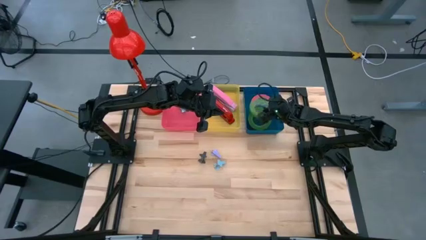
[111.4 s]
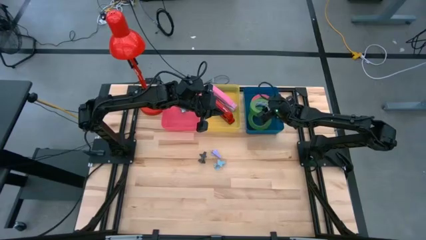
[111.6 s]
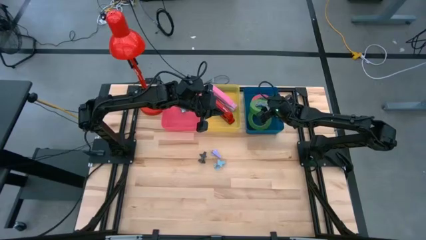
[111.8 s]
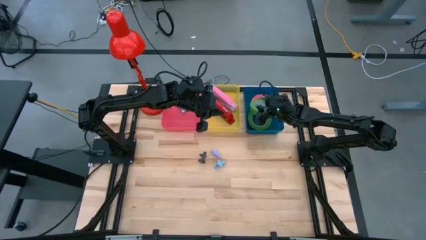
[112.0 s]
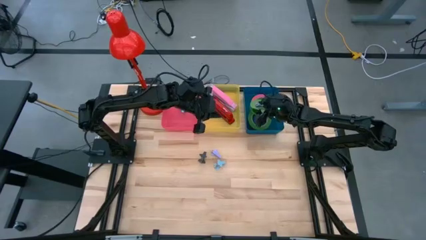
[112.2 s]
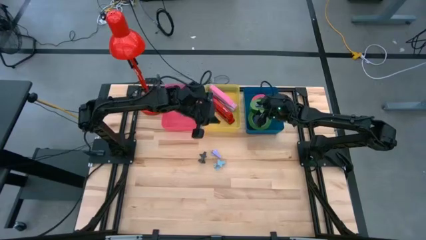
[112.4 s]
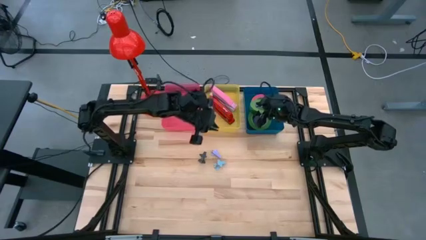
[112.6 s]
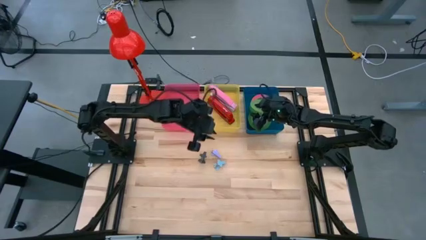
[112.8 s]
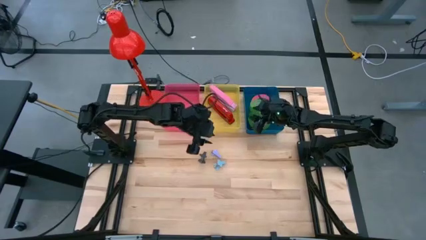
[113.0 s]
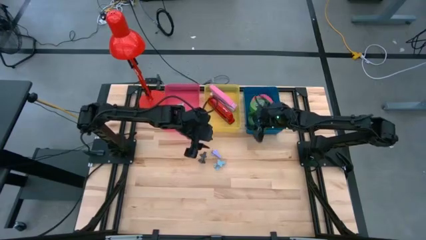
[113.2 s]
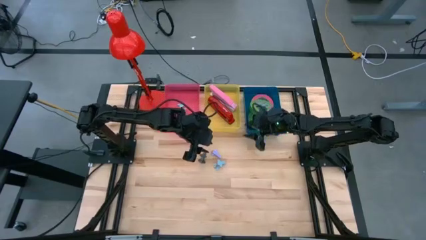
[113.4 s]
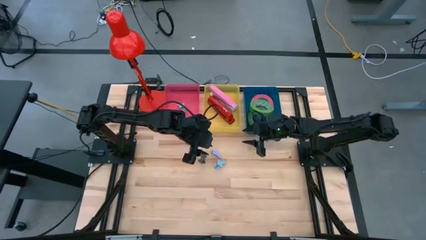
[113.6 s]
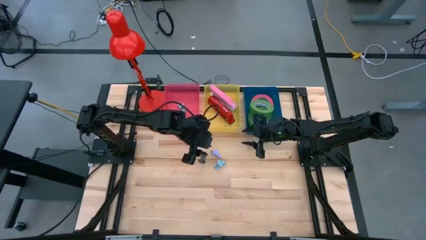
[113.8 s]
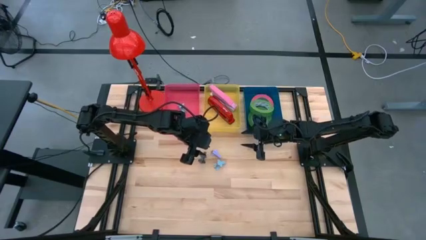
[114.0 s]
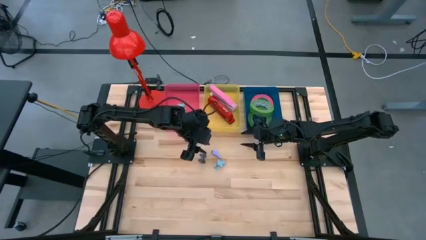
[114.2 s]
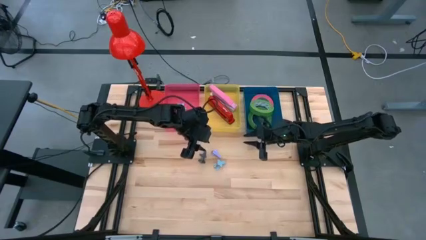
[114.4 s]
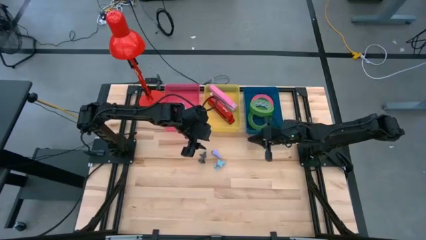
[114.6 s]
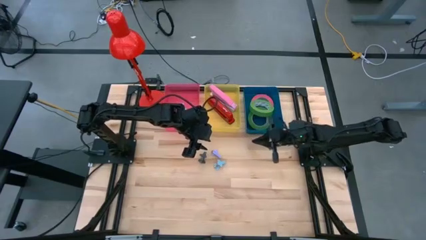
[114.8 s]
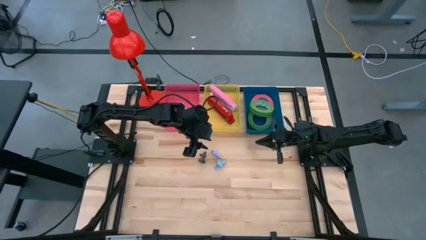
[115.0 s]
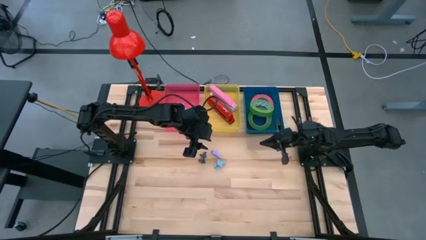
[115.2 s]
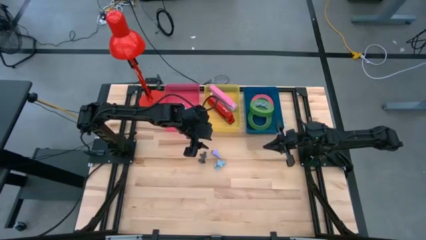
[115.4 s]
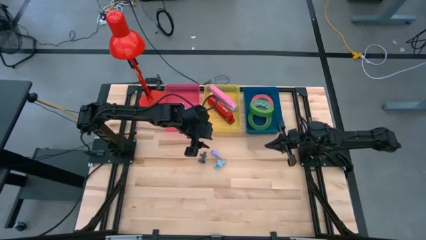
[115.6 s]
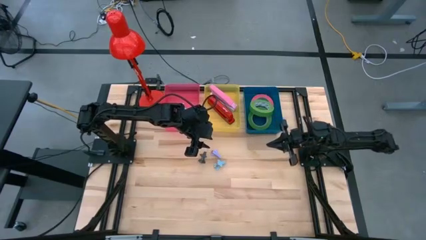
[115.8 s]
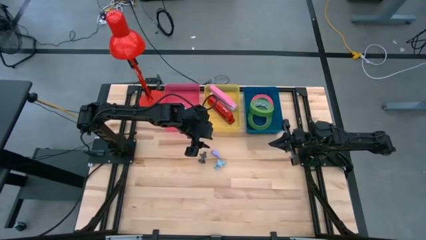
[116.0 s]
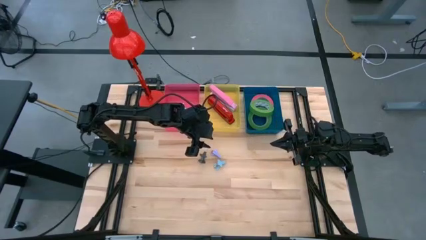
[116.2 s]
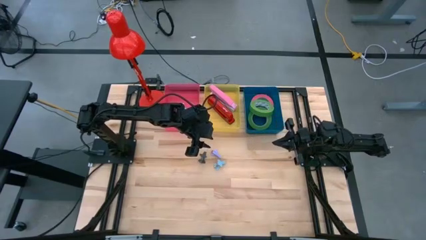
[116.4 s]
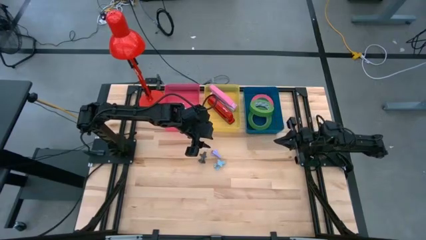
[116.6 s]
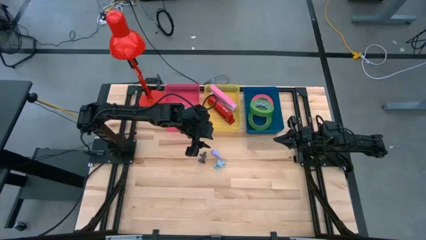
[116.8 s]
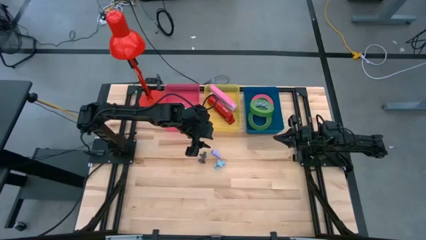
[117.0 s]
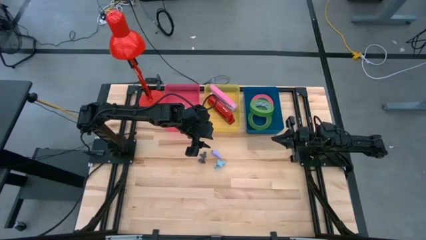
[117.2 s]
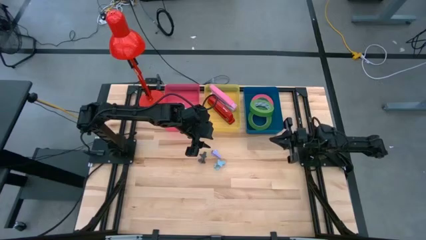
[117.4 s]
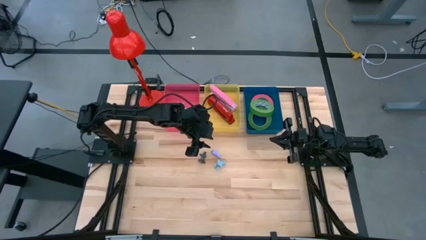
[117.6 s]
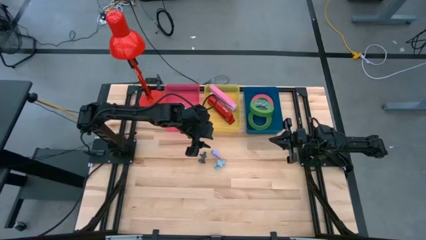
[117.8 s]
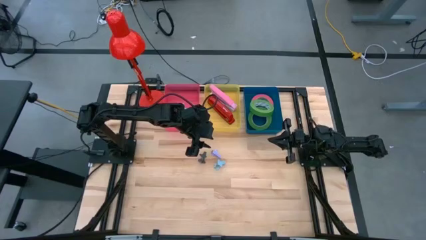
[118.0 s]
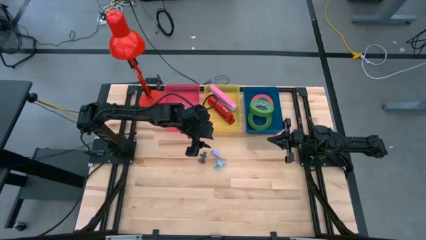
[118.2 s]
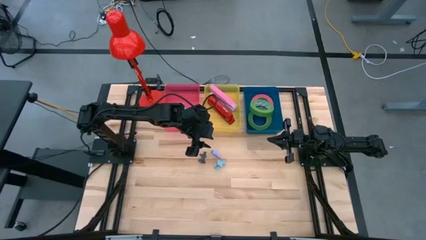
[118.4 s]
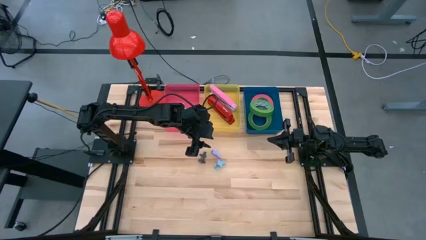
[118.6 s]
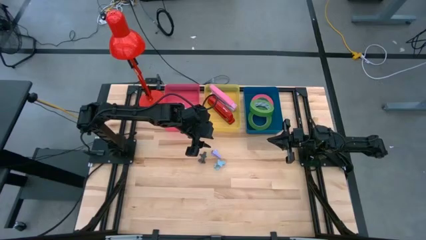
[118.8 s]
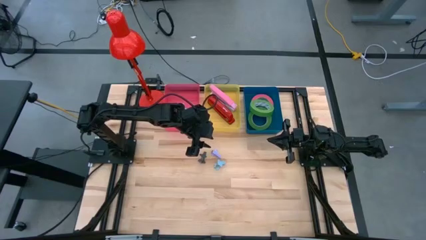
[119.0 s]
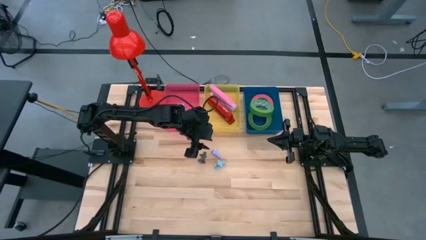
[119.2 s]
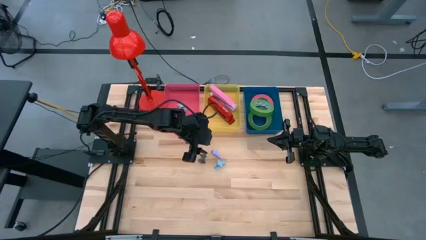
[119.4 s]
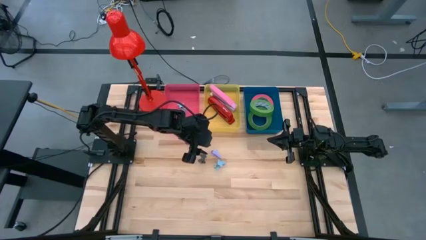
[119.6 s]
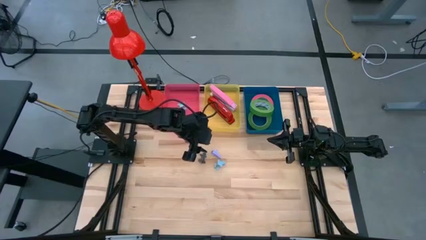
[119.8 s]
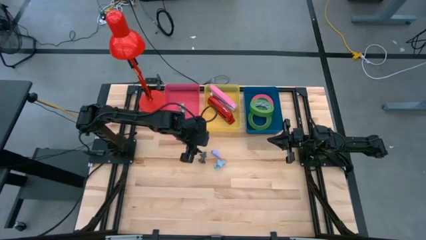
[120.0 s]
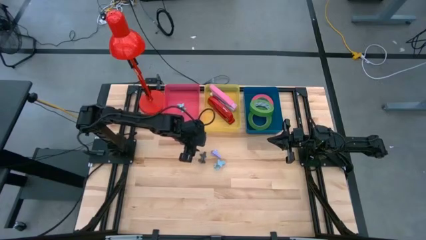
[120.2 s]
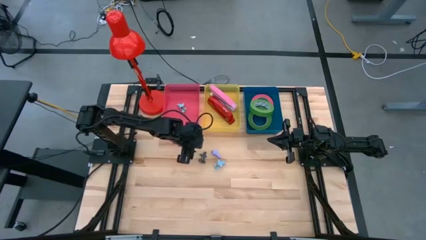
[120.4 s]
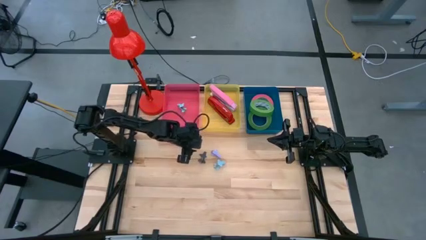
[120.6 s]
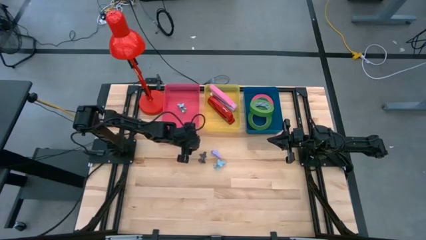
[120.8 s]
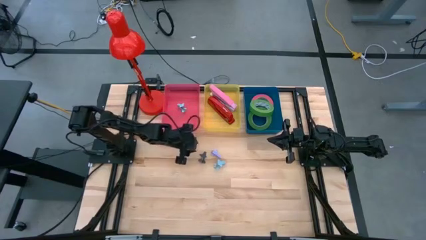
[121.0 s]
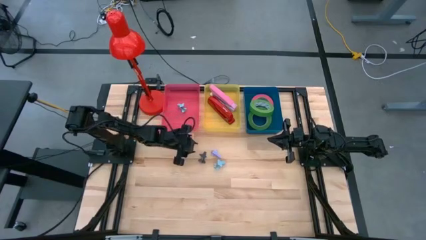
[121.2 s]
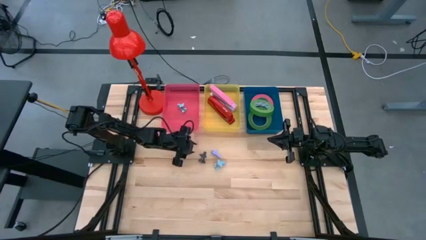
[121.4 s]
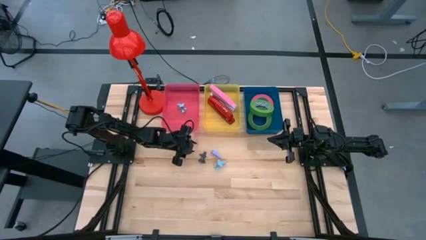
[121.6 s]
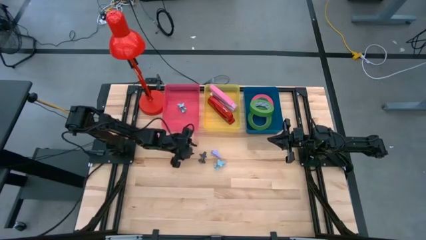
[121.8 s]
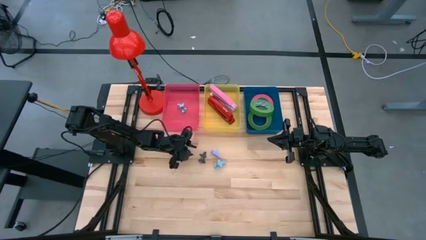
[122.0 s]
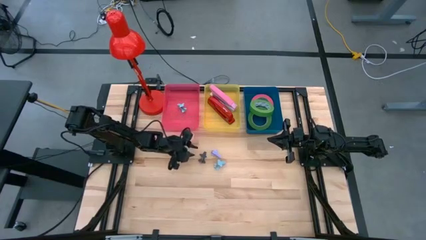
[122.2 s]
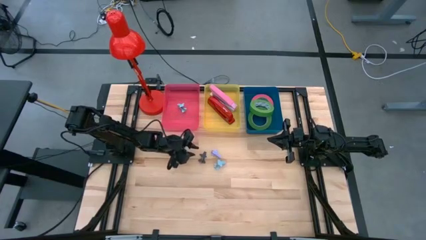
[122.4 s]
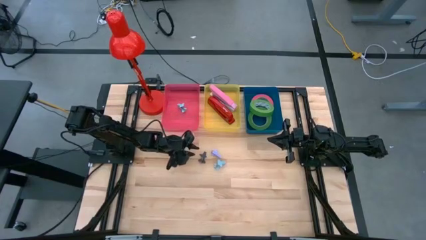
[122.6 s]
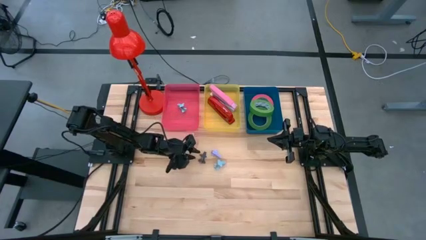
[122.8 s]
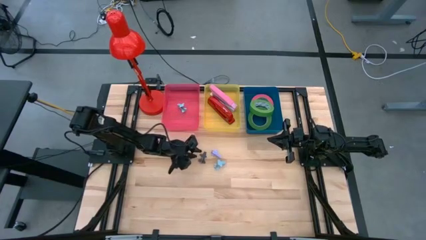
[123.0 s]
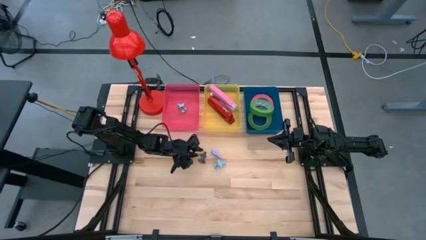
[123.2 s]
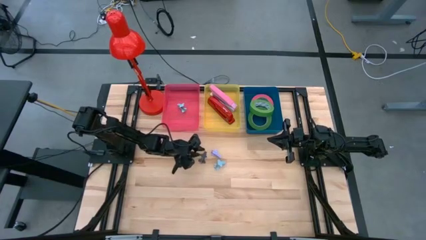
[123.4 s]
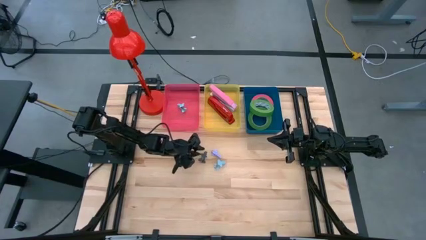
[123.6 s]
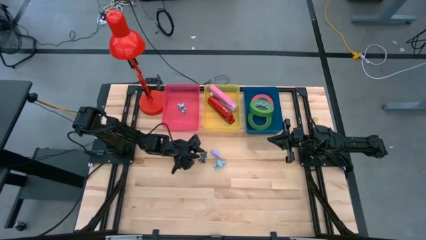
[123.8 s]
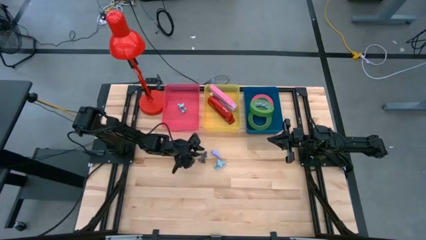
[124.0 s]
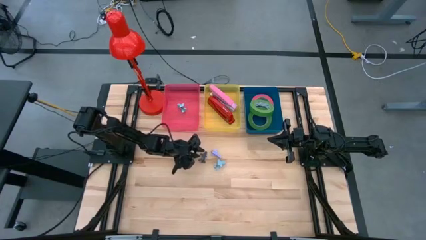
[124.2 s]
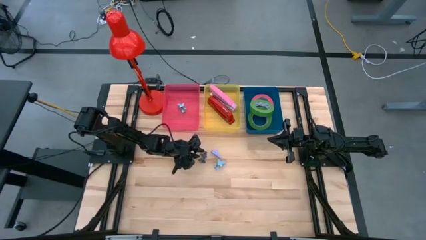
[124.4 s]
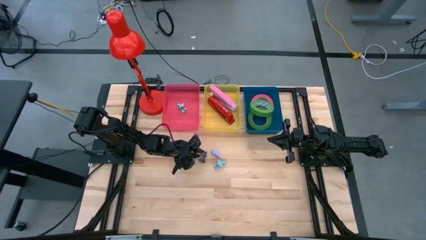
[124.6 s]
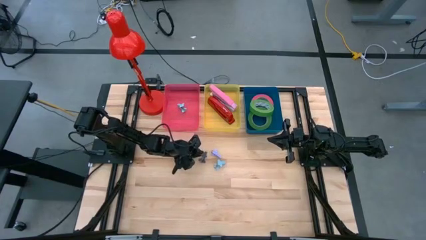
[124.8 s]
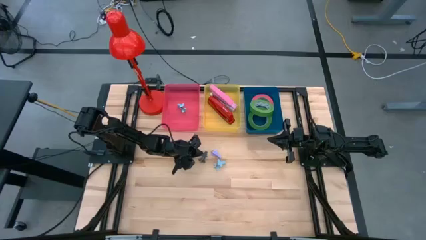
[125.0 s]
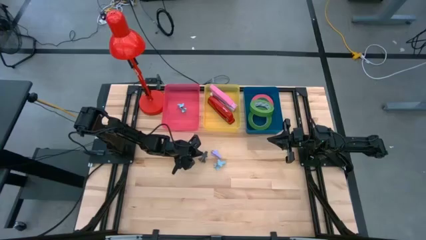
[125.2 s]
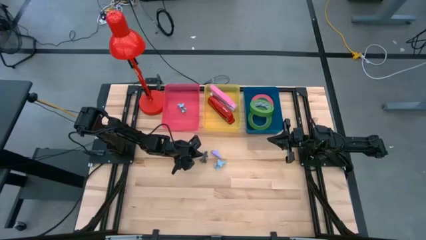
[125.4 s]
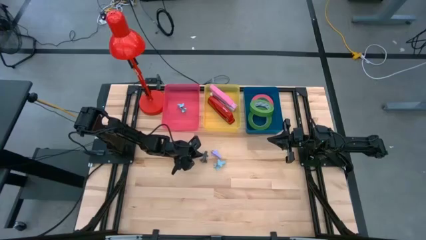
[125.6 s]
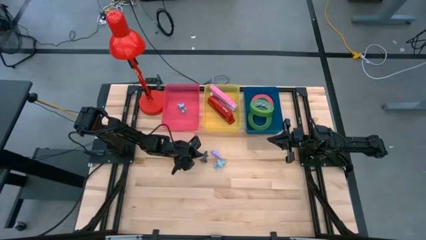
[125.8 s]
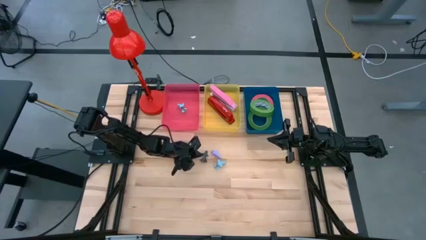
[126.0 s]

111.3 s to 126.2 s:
Task: Pick and place Stapler, Stapler remover, tape
Put the black staple remover into the pink bin
